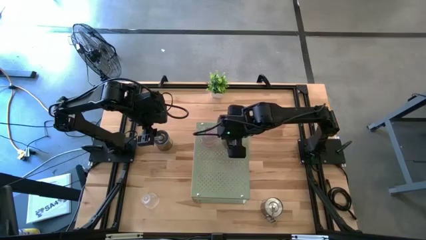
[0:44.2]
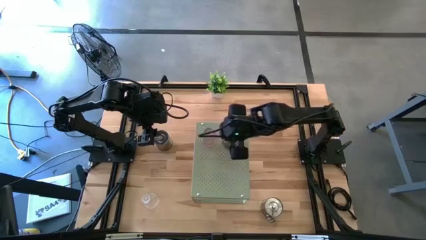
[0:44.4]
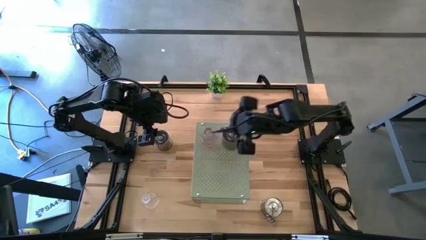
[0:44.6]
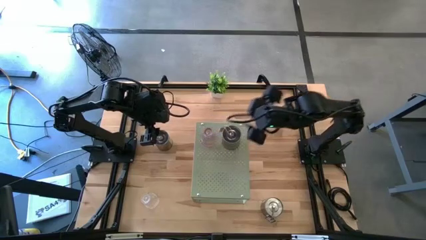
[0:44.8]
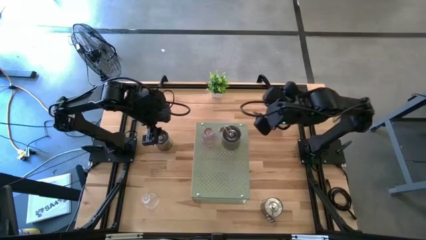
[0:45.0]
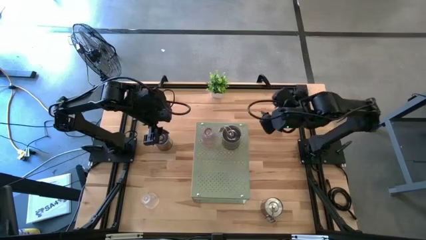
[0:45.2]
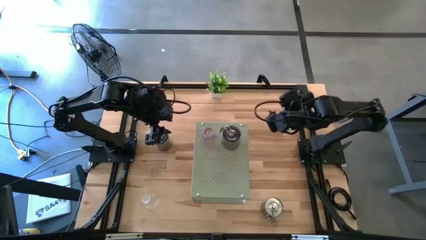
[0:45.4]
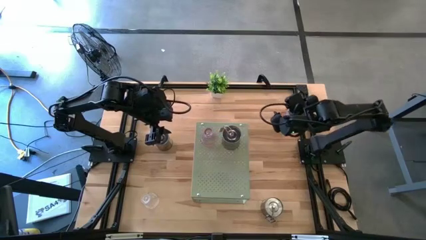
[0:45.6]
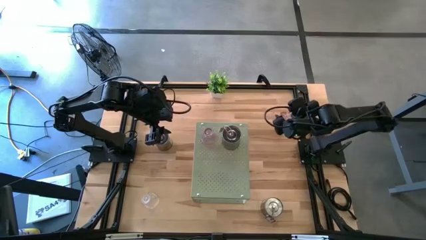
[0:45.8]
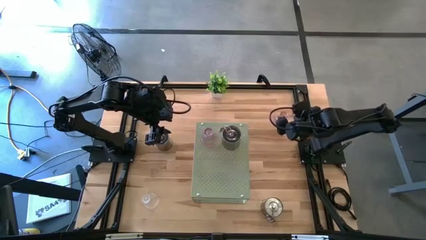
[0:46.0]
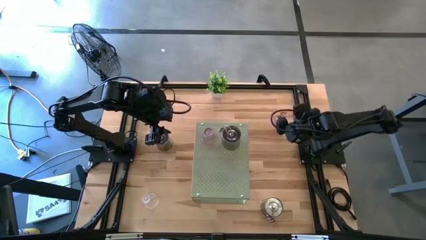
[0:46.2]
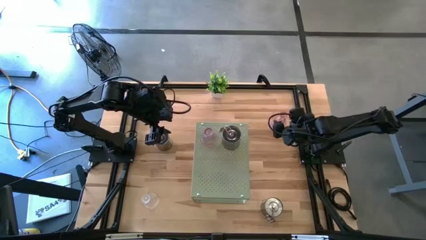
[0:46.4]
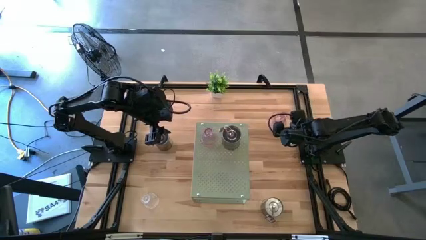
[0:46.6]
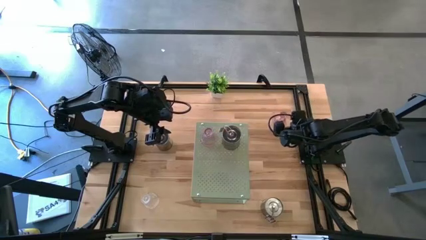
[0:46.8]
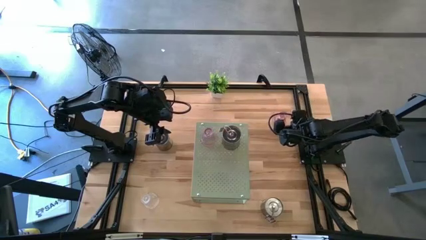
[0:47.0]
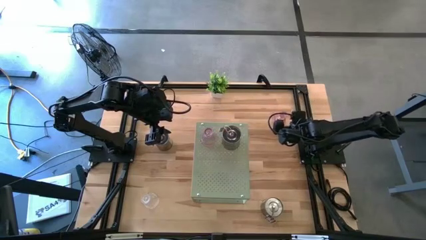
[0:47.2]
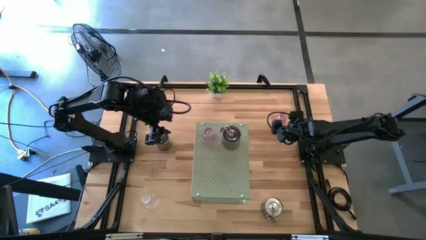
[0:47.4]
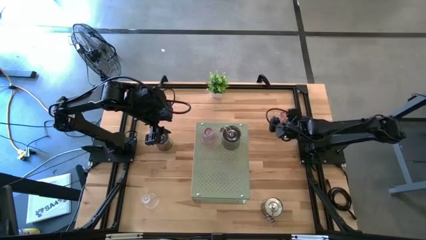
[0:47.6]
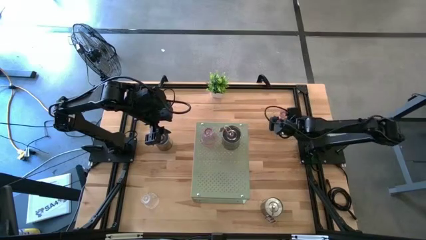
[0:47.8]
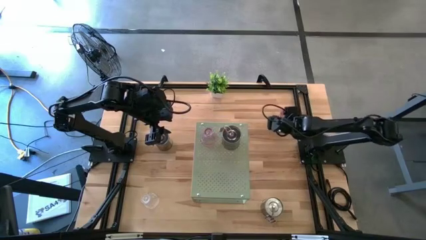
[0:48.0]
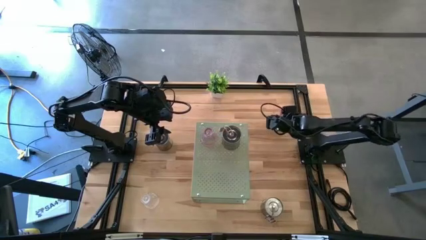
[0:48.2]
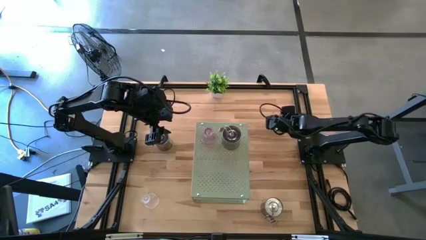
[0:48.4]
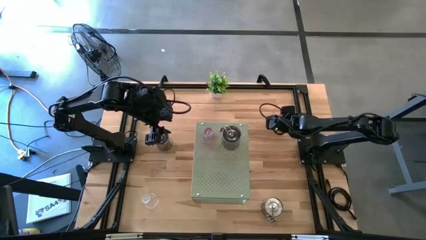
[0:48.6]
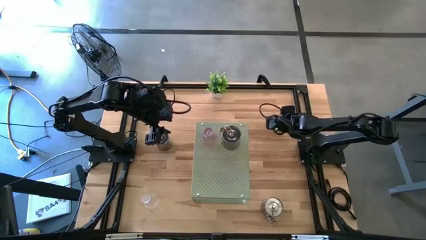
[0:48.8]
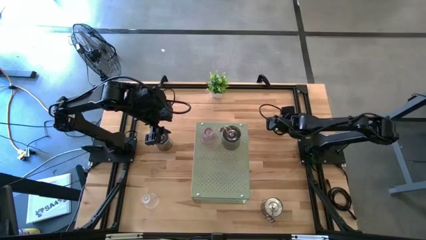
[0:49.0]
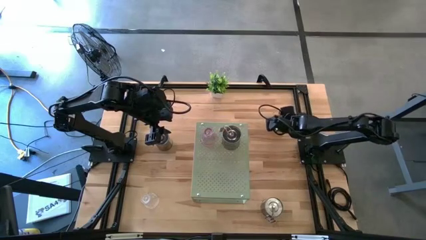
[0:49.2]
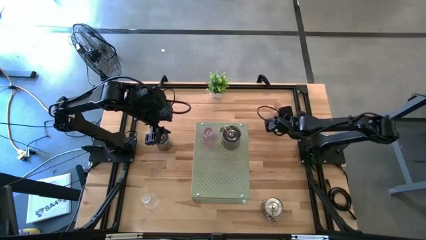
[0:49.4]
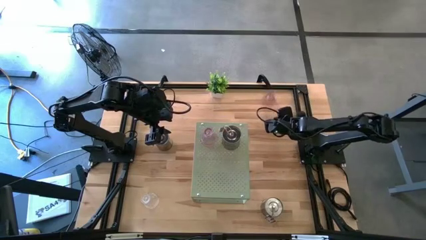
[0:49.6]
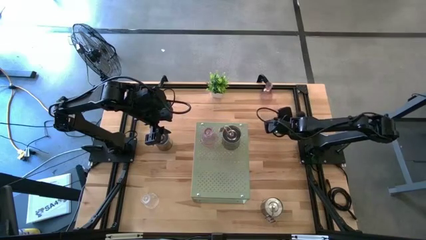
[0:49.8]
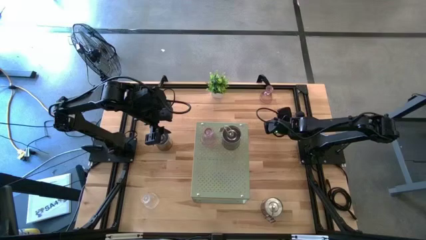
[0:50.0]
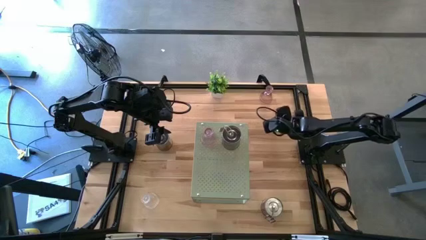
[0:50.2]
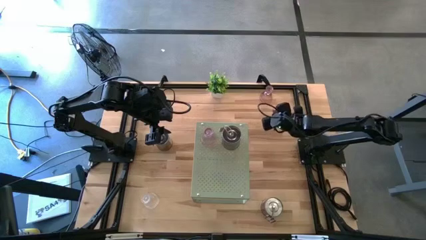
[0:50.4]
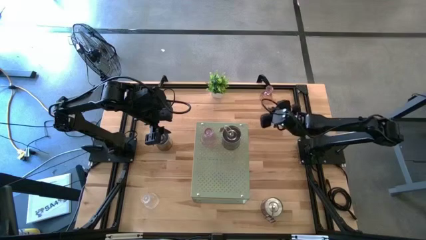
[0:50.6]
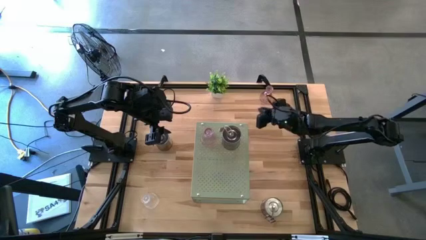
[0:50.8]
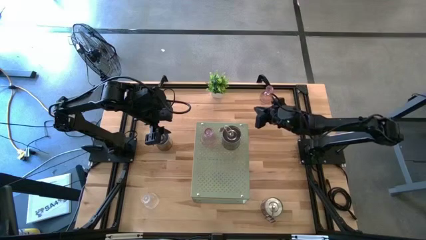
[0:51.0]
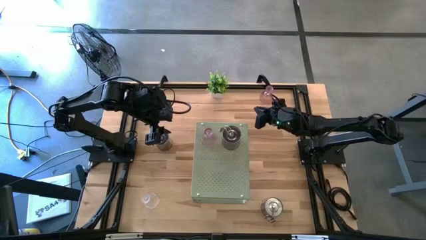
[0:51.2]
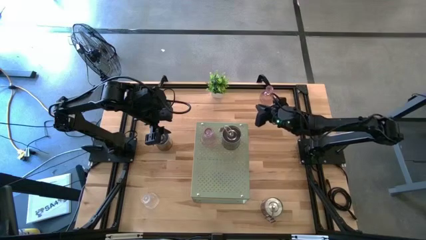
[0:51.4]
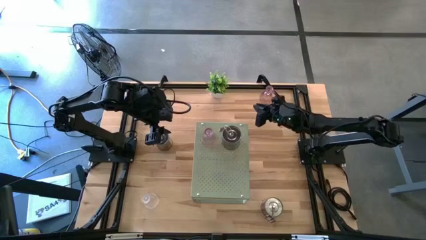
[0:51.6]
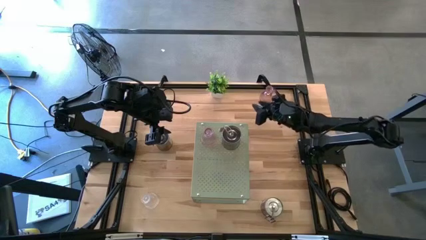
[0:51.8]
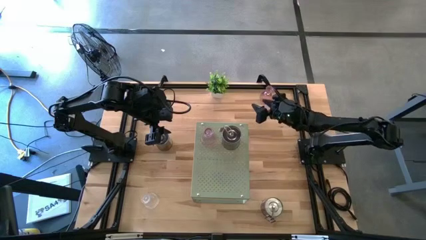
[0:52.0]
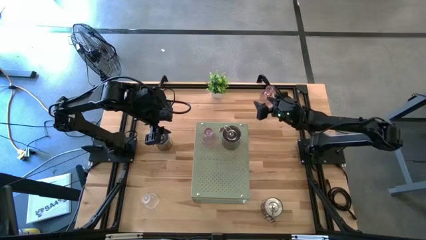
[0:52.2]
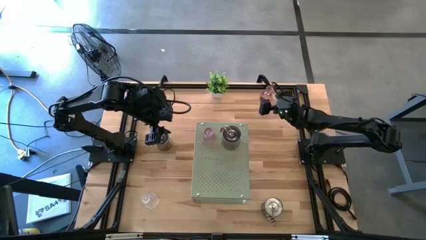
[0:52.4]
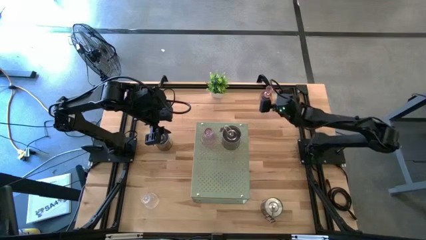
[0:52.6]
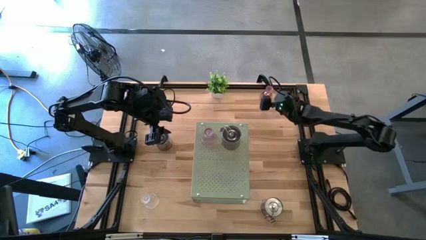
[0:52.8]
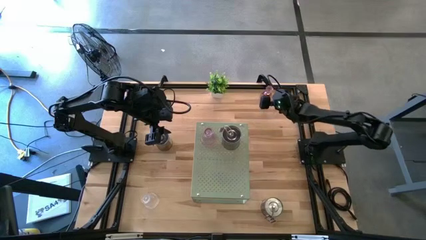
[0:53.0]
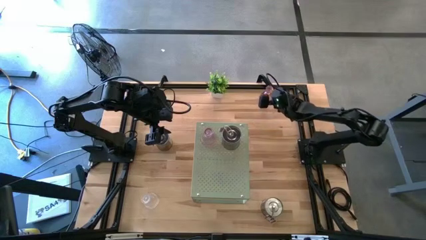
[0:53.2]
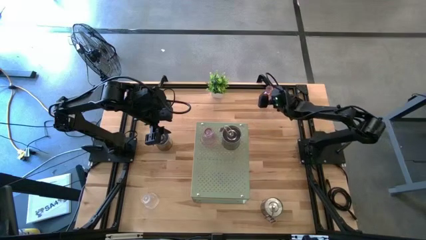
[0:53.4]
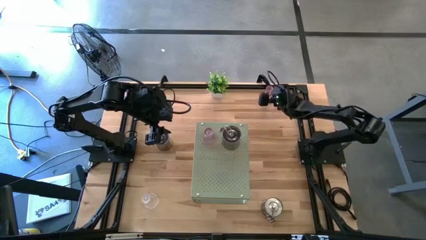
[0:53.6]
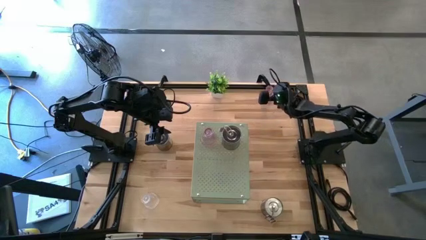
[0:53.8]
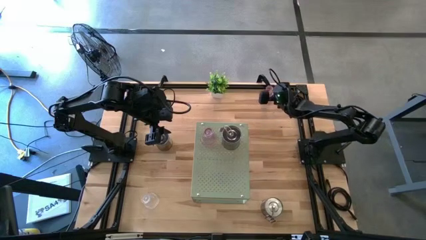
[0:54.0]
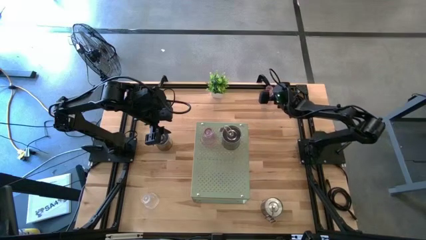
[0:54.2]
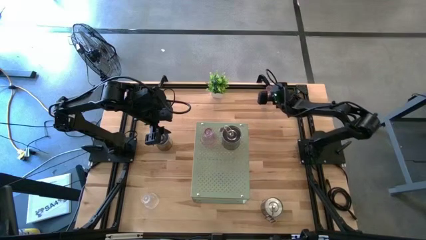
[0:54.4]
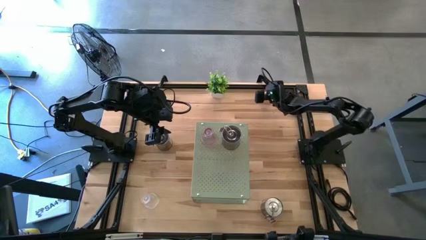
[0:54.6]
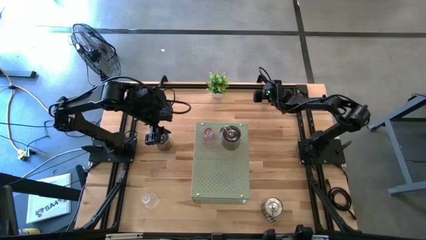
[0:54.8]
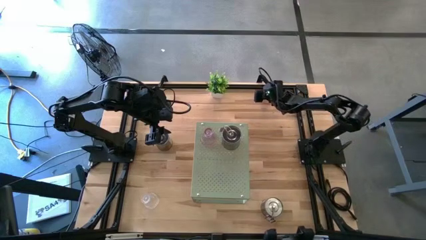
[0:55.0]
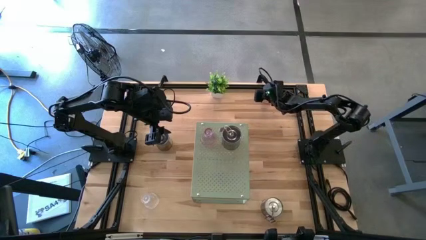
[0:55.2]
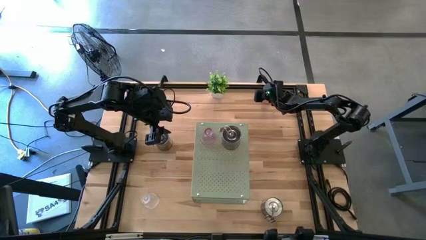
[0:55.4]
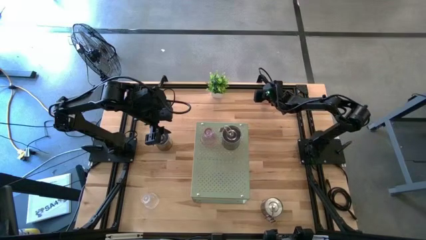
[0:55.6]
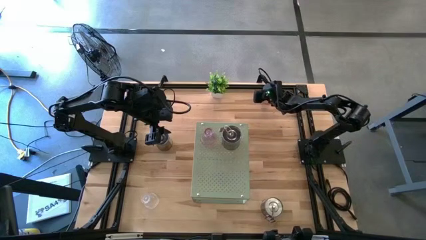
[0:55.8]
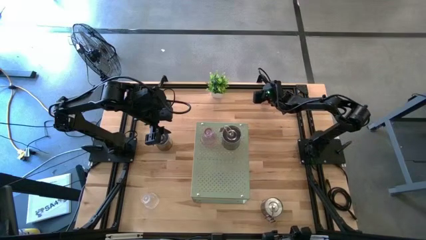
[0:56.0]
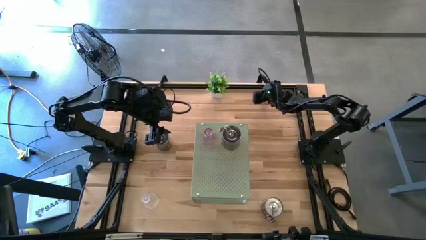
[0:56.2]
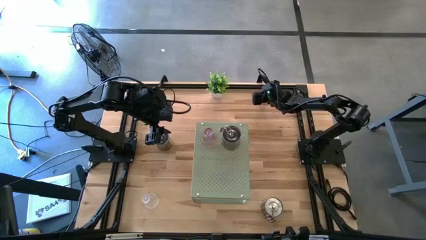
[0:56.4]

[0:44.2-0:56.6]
Task: Pick & Place candle stick holders
Put the pink transparent candle holder on the shelf
